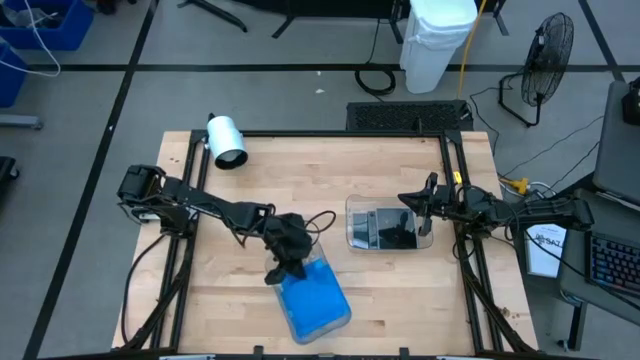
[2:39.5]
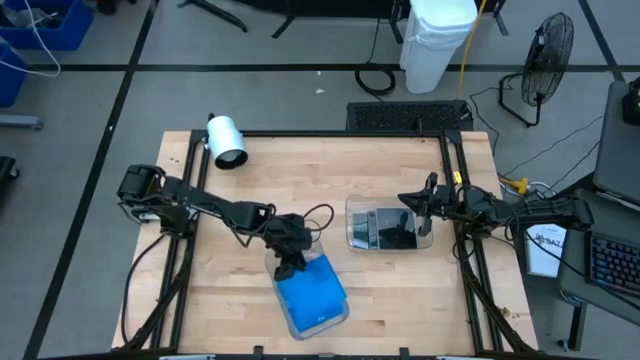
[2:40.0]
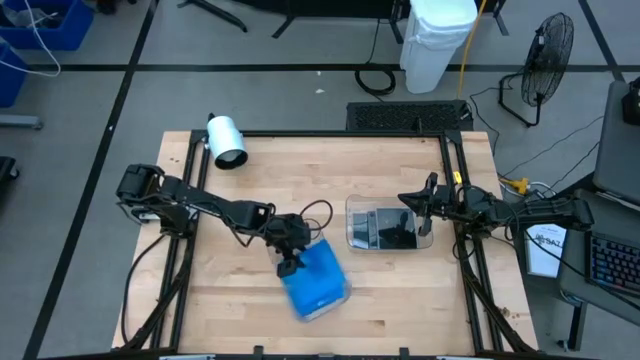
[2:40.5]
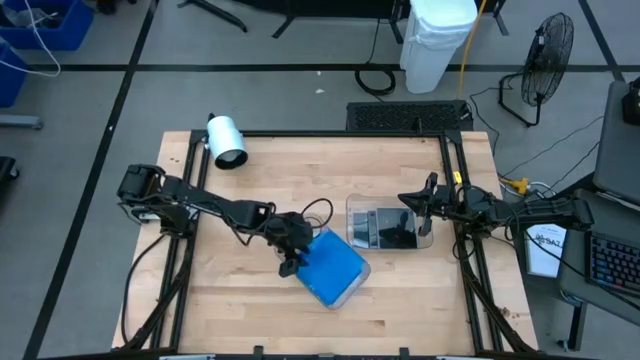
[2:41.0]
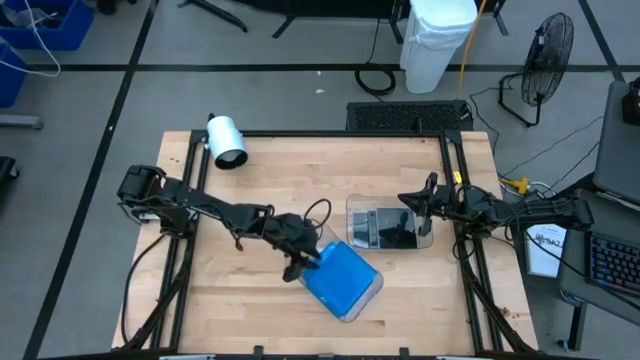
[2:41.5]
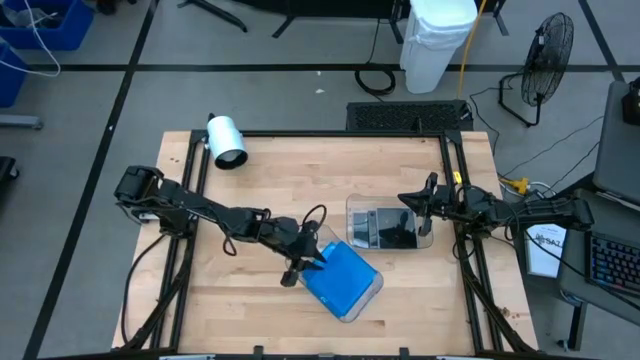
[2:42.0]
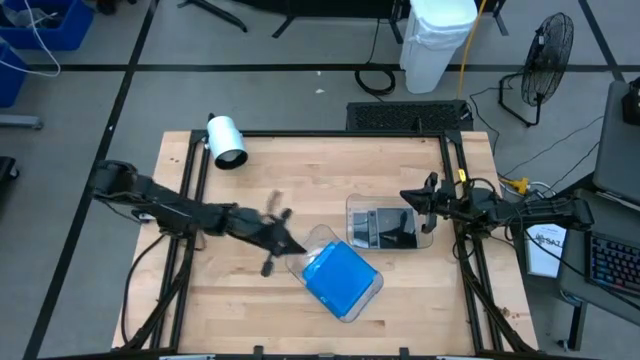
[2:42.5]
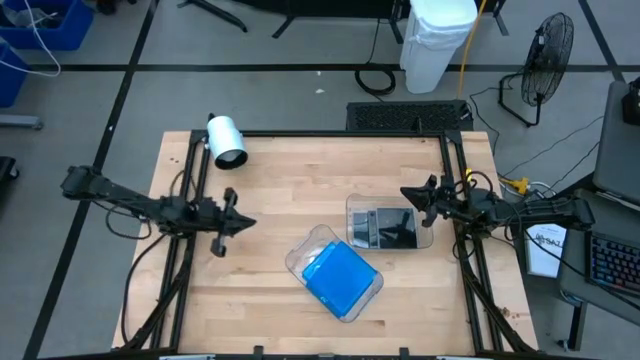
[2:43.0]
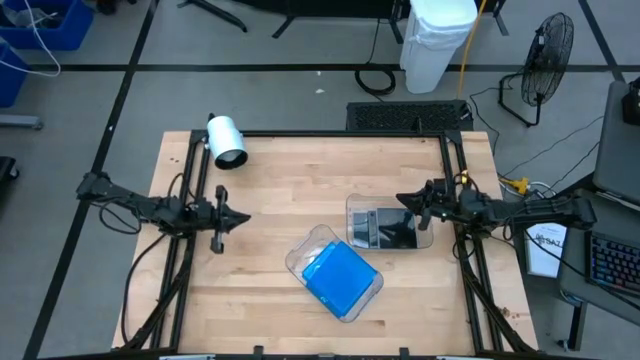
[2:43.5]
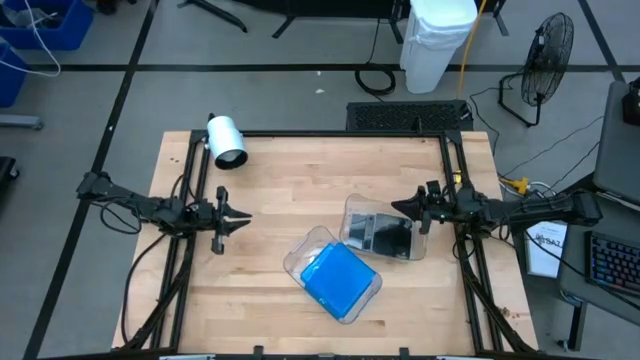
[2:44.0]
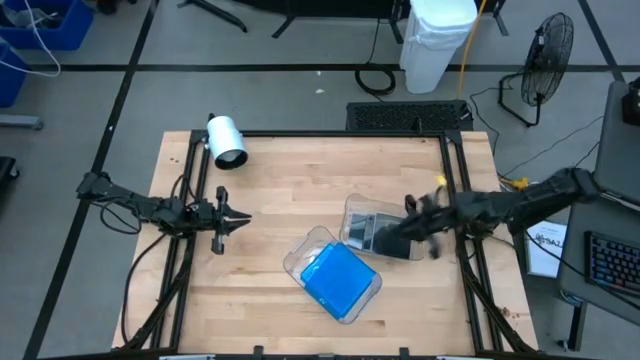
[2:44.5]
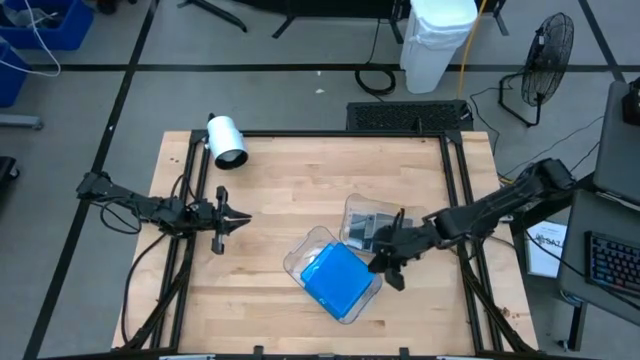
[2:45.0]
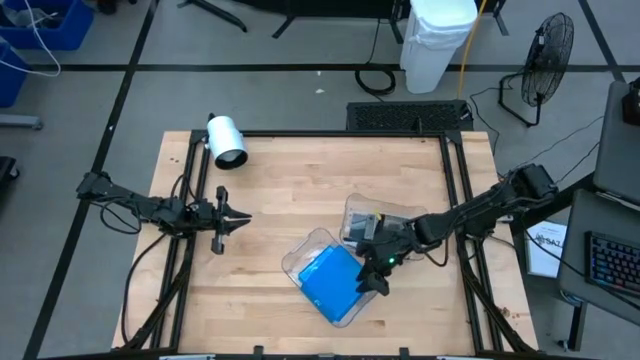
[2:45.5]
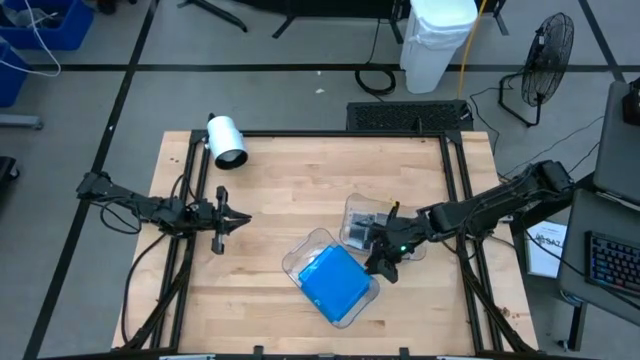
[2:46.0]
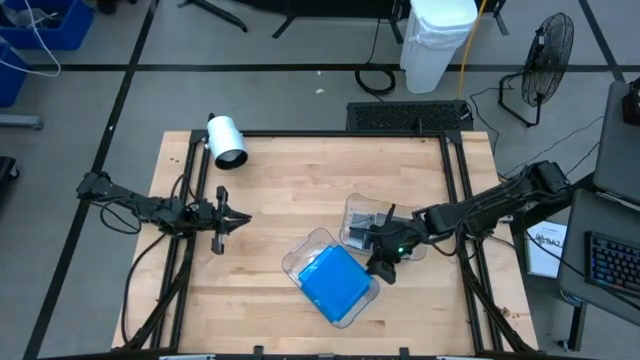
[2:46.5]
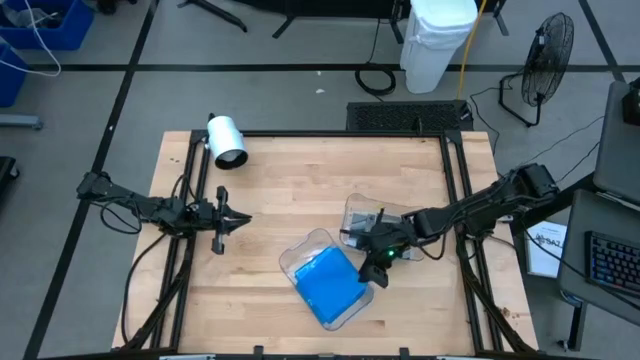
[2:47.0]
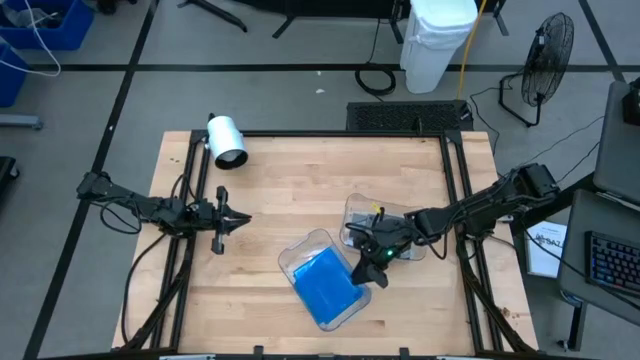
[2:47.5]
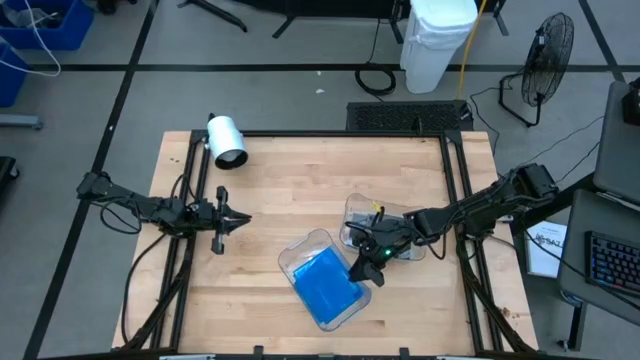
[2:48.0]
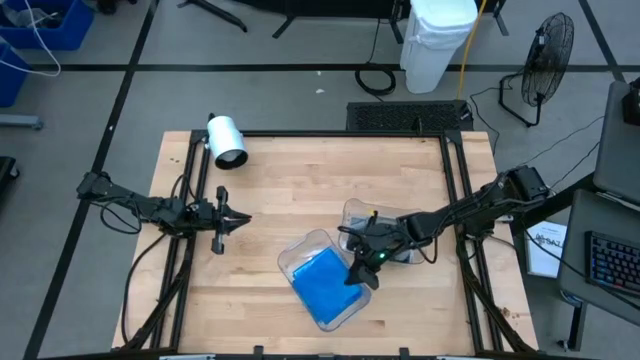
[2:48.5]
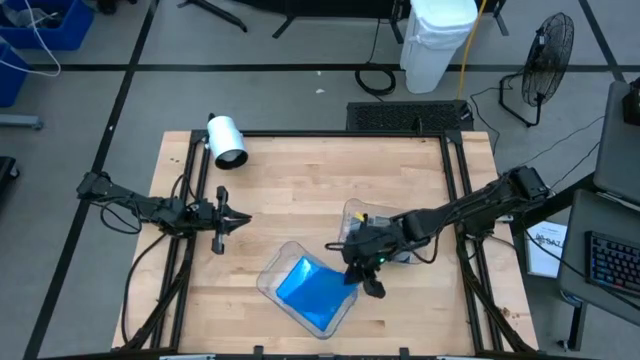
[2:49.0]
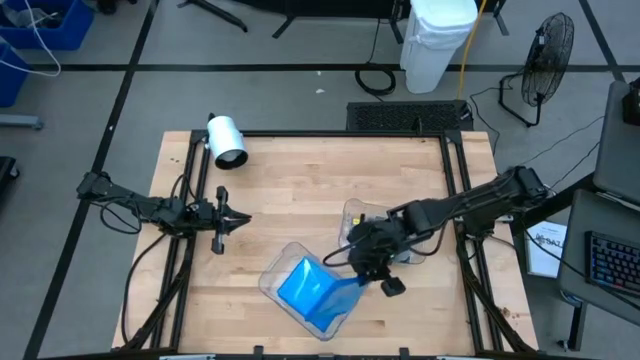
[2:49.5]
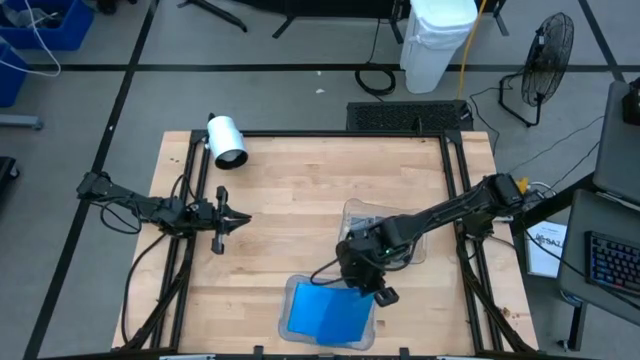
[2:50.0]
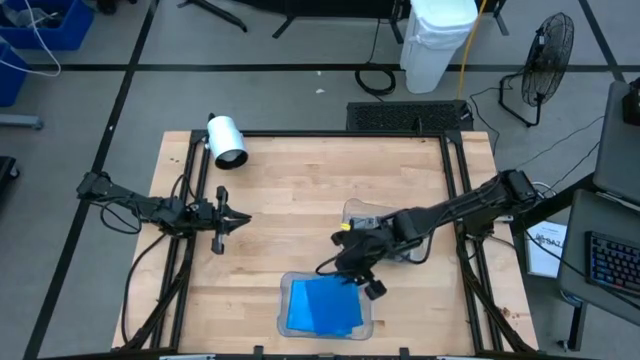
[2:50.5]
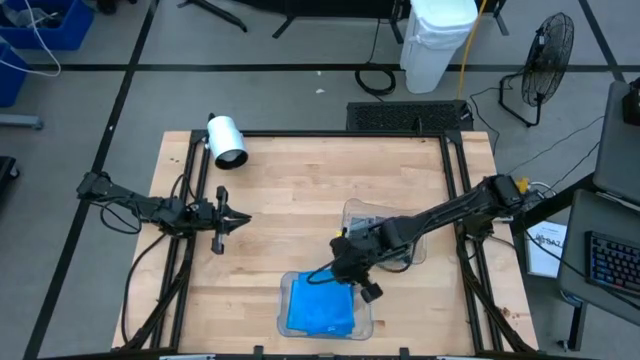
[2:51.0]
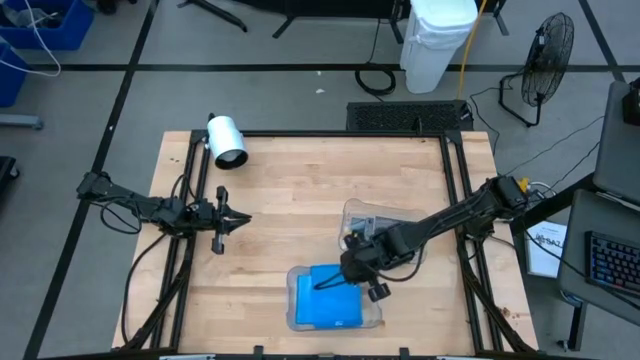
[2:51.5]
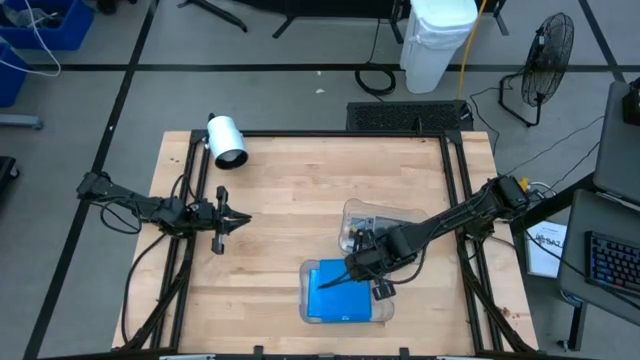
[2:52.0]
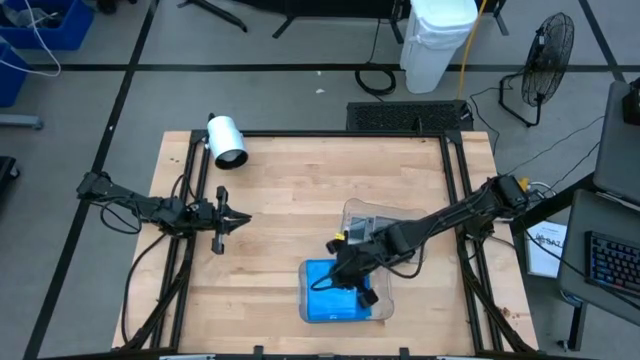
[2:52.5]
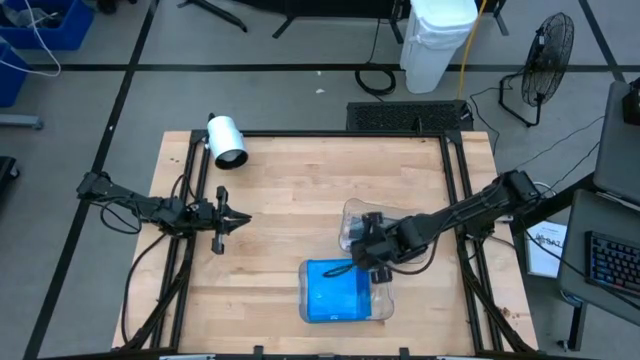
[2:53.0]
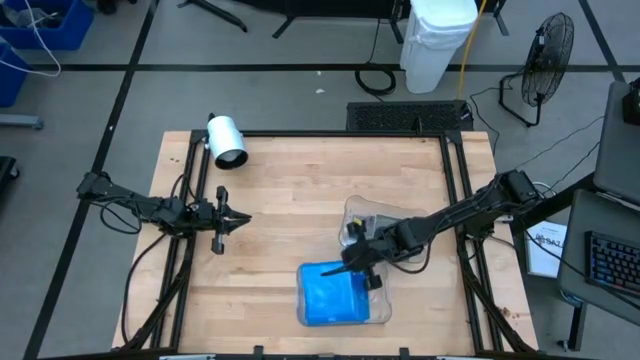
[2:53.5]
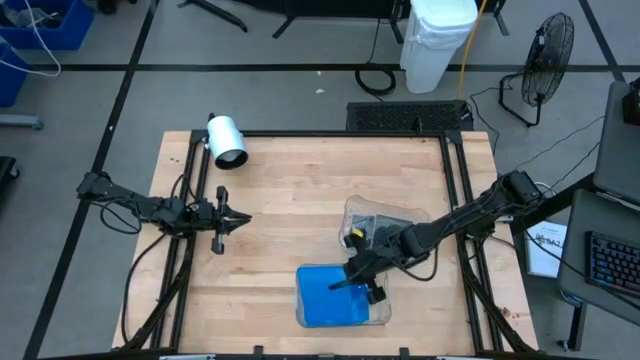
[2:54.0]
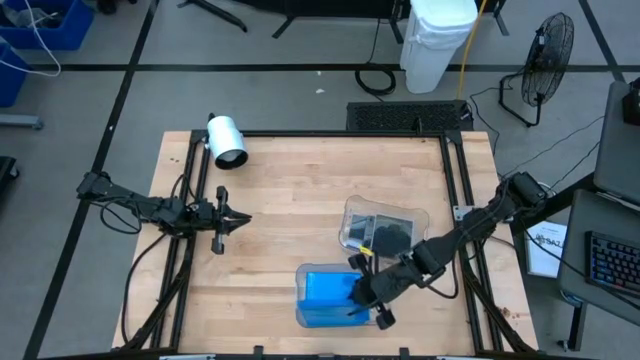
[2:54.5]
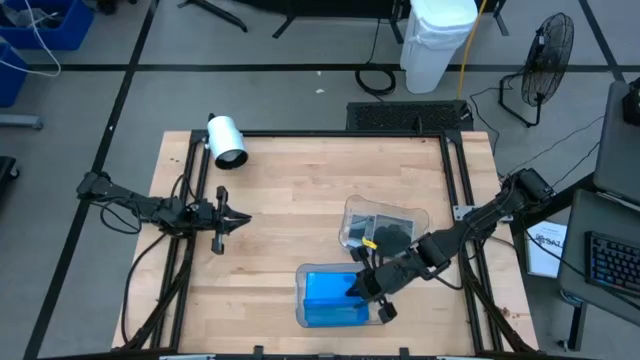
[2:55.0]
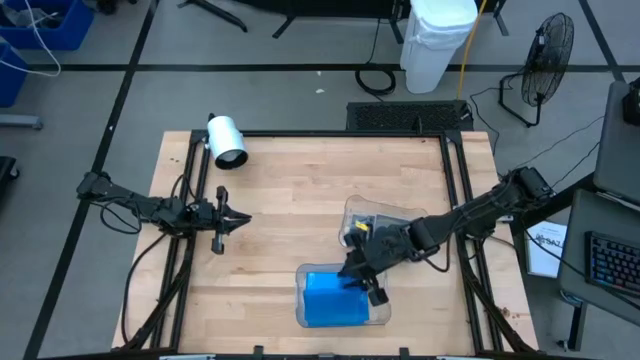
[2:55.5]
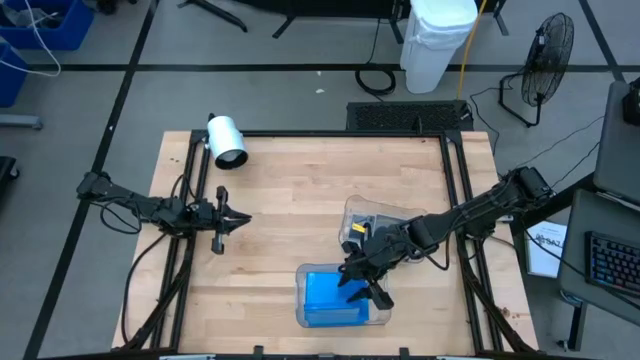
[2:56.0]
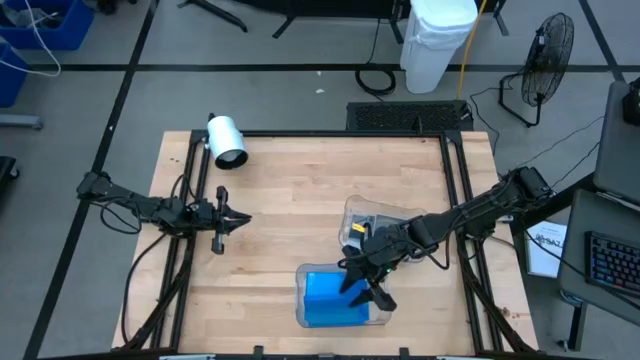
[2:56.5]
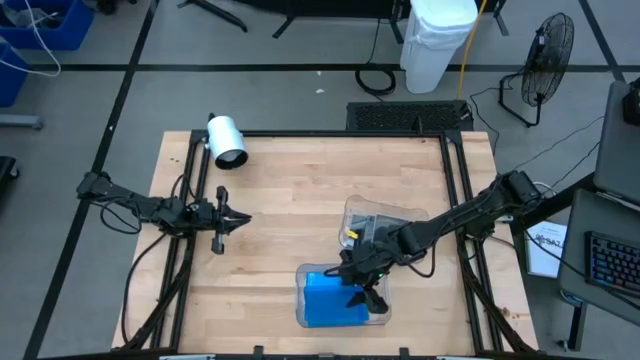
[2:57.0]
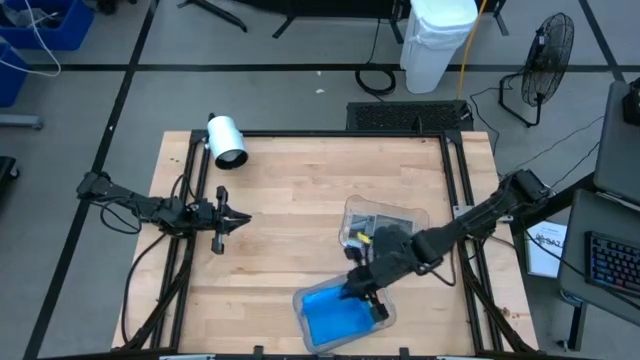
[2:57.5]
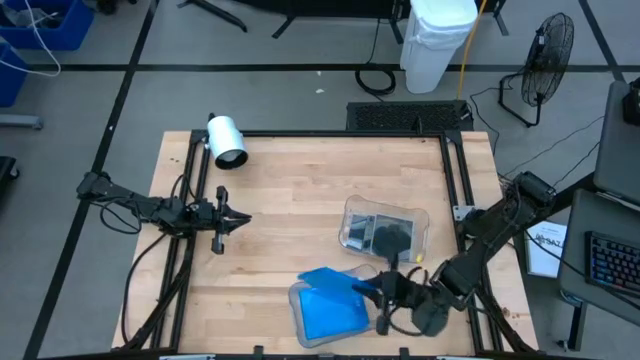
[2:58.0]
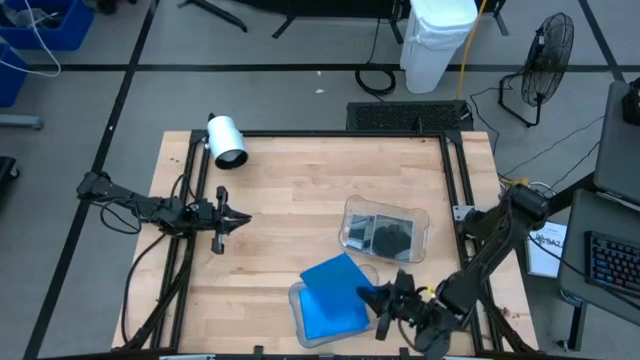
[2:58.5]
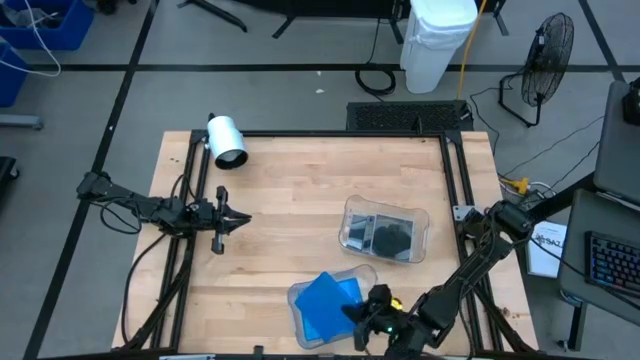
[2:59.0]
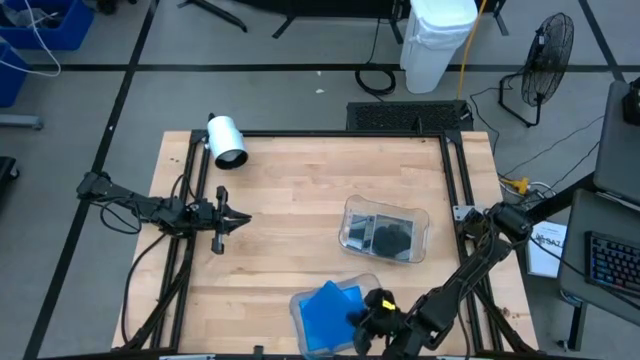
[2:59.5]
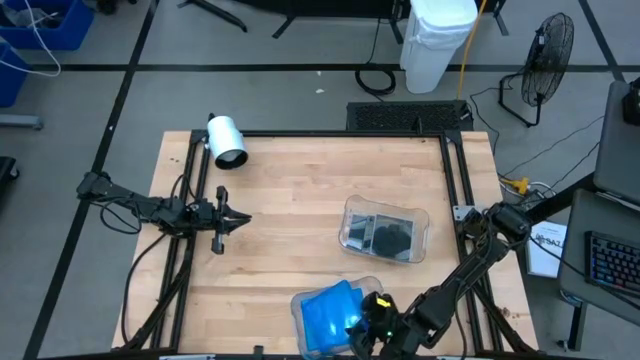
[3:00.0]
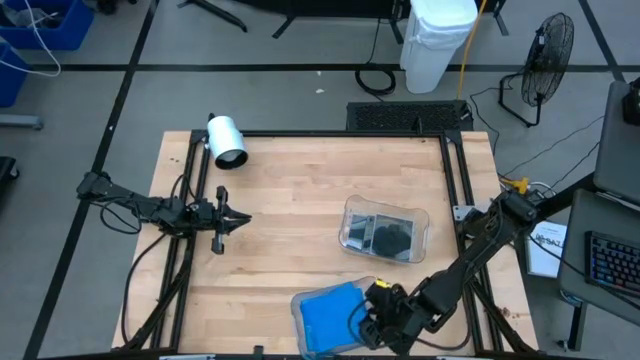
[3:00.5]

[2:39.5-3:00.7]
Task: Pick & place jewel cases by type
Put the blue CD case into the left transparent bin

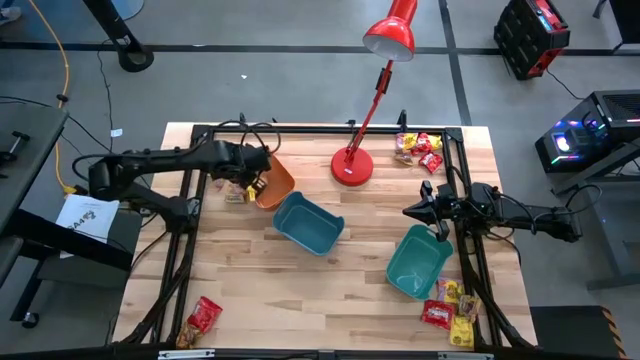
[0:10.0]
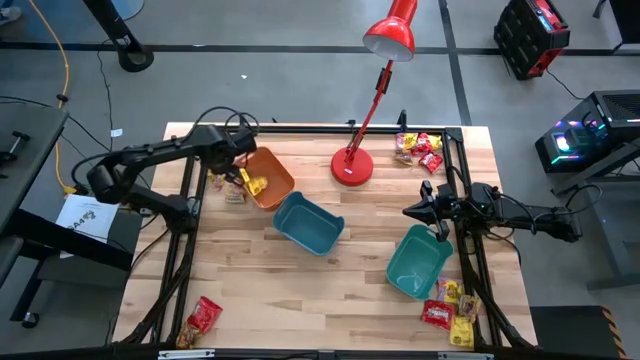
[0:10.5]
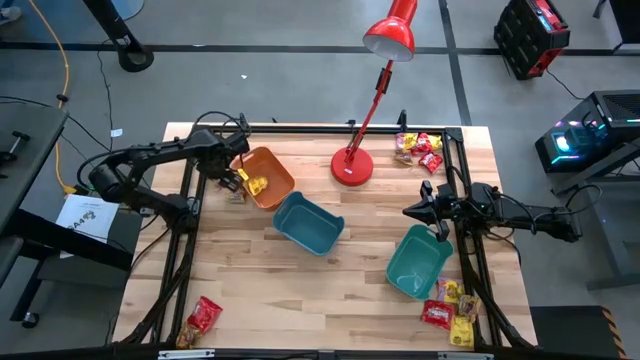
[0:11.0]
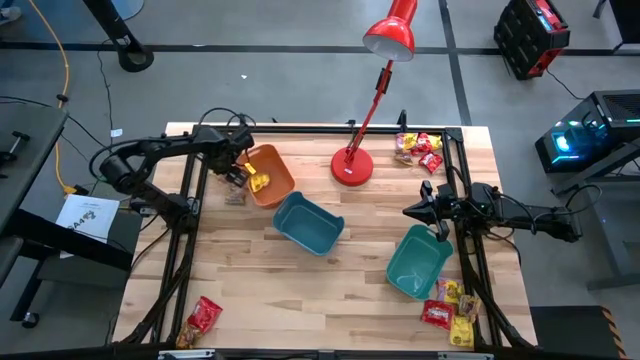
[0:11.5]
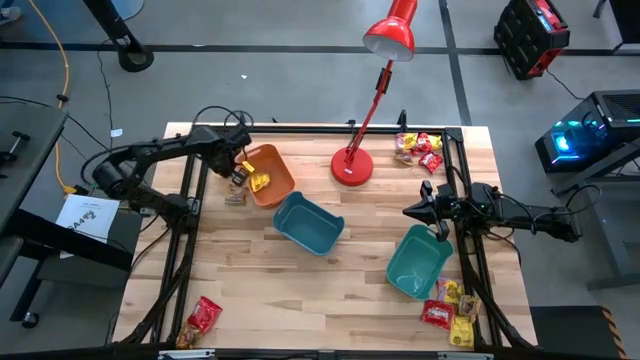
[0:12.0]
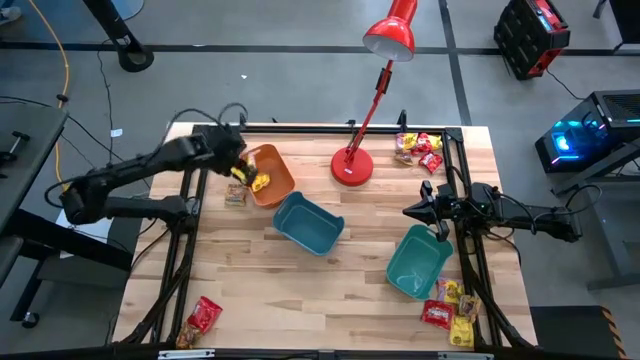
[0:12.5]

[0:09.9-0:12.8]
Task: Sort candy
Put the top left yellow candy into the orange bin
